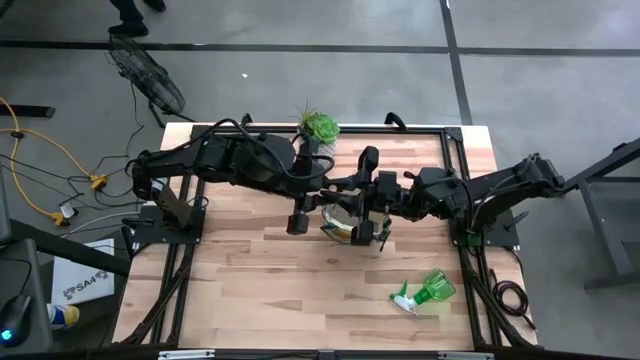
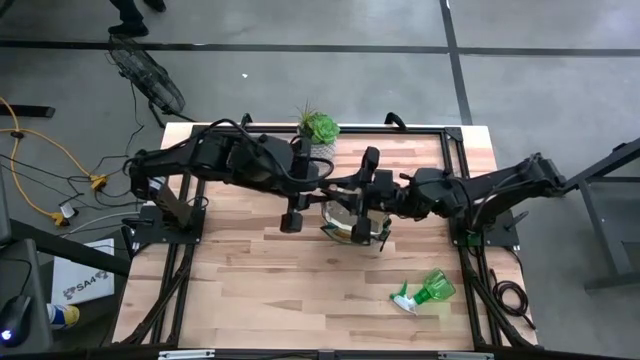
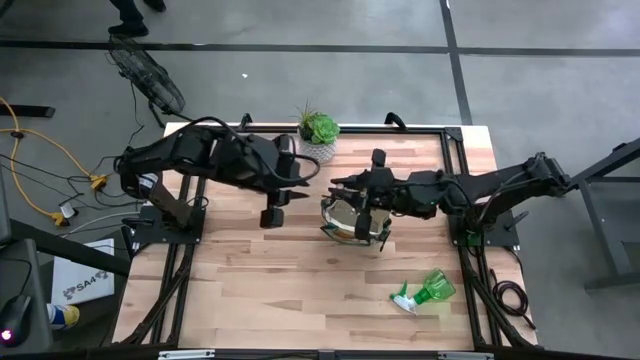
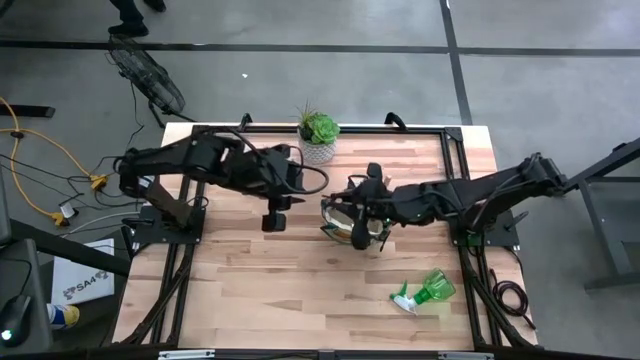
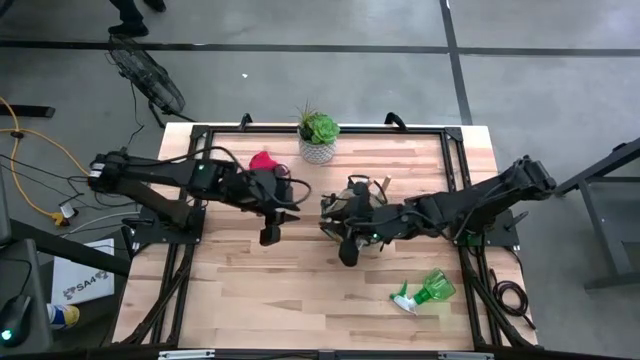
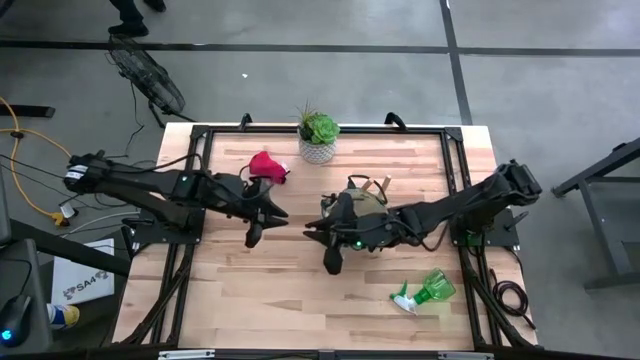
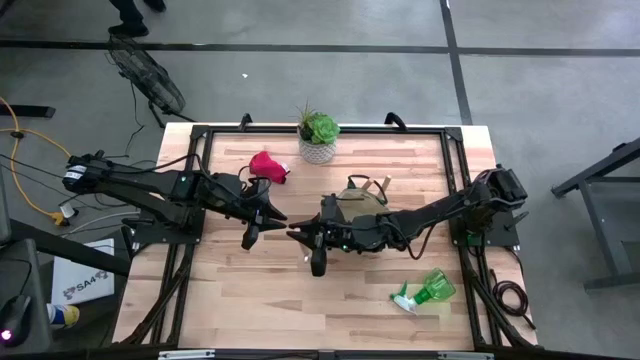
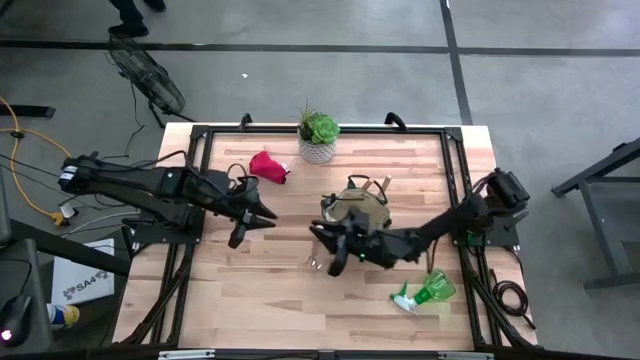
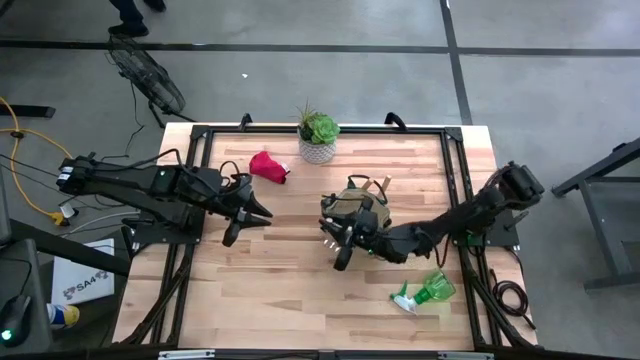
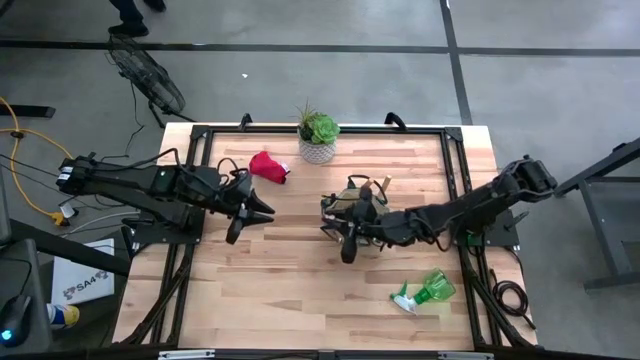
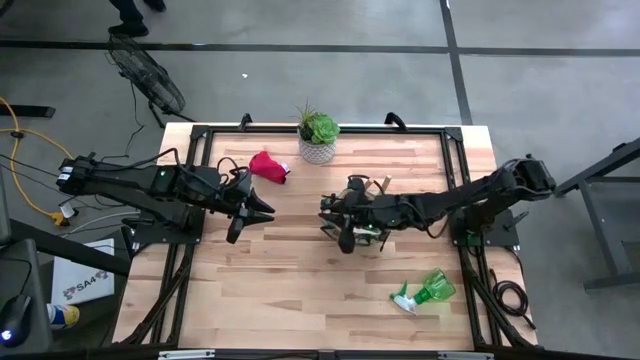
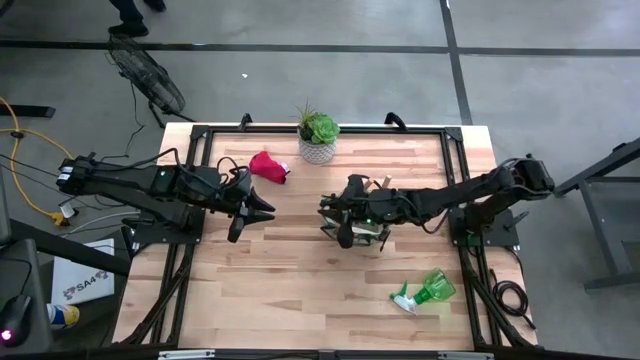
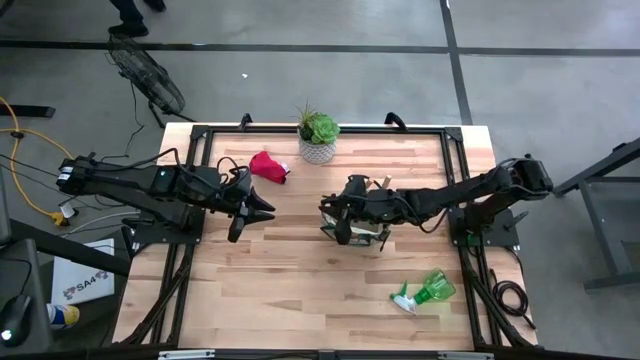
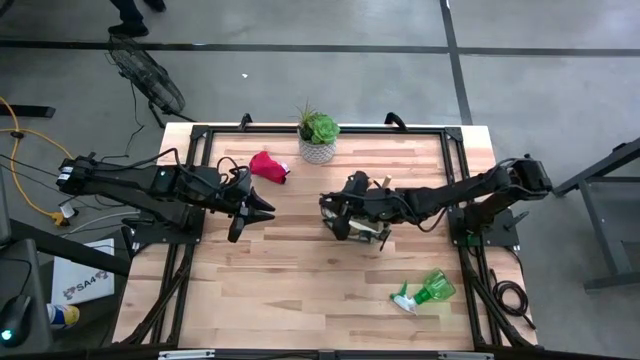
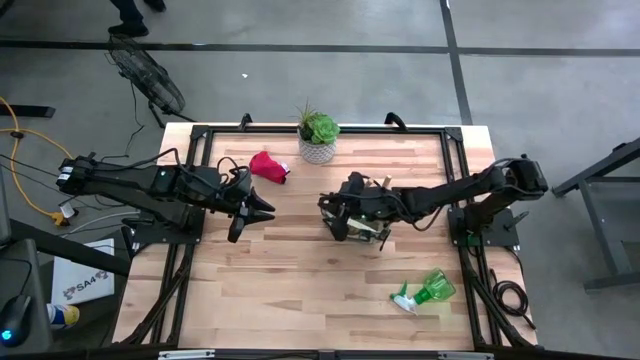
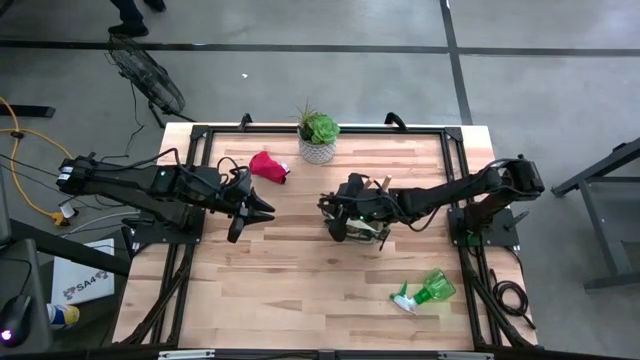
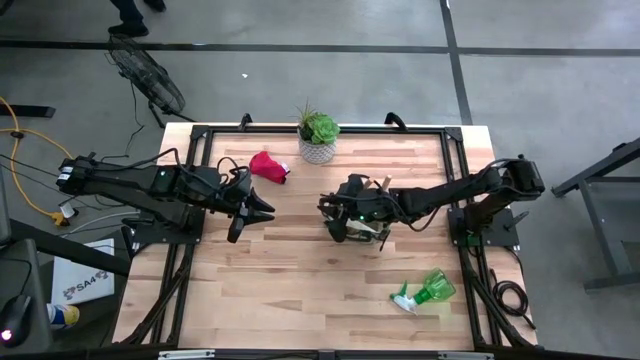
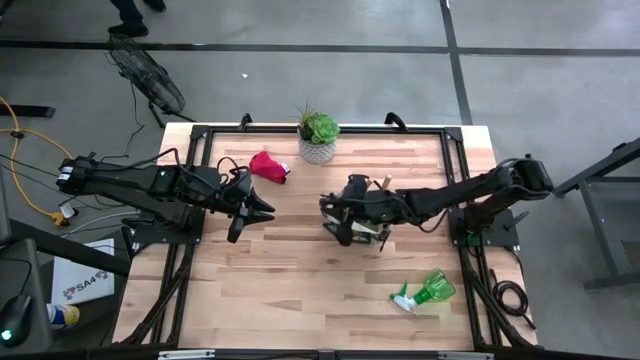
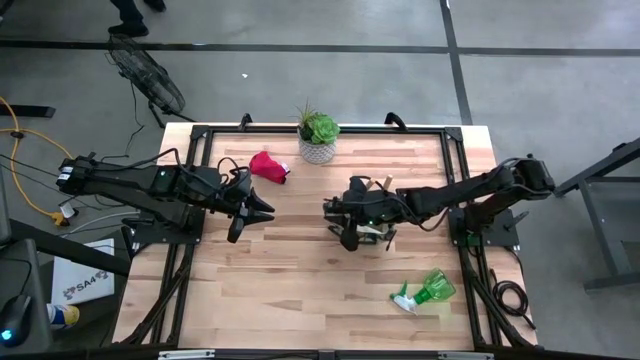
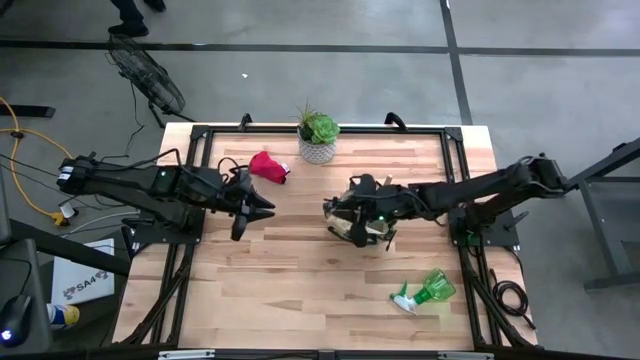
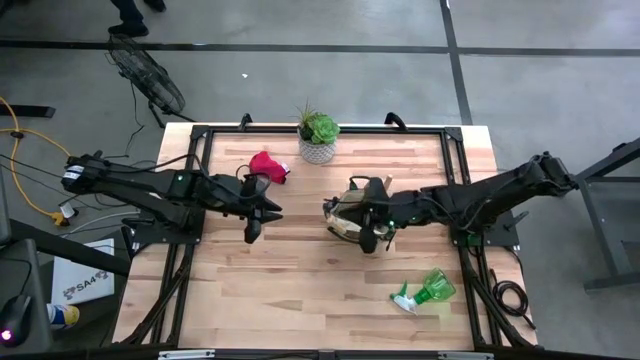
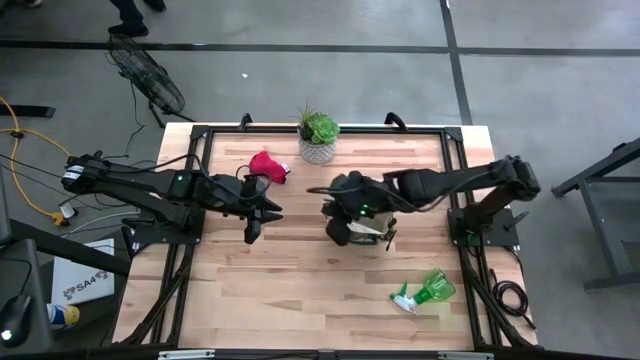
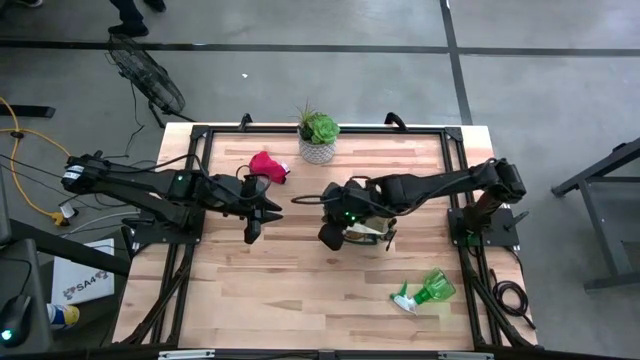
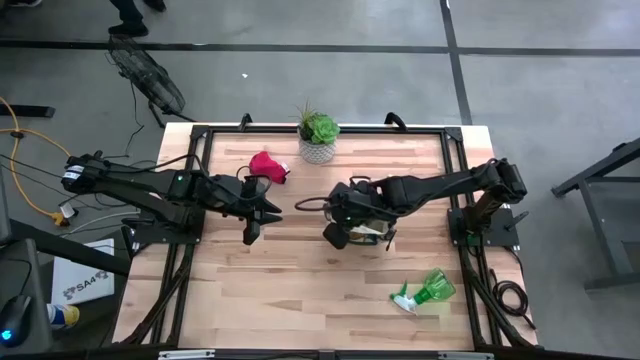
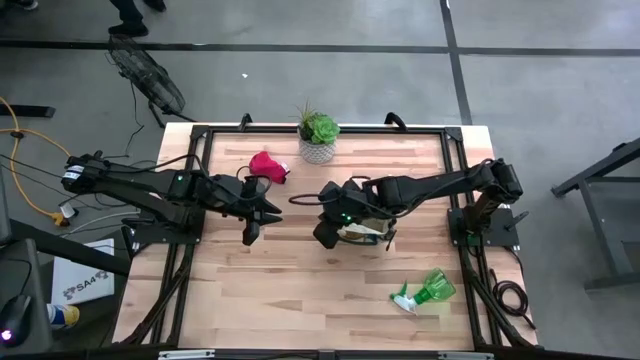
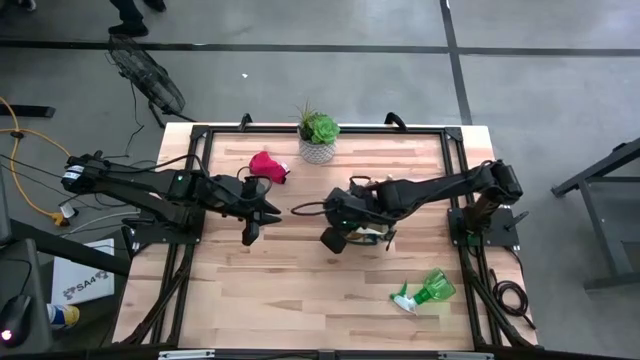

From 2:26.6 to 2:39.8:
Task: Pick & Place Garden tools in Gardening bag
Put the brown hand rake into the gardening bag

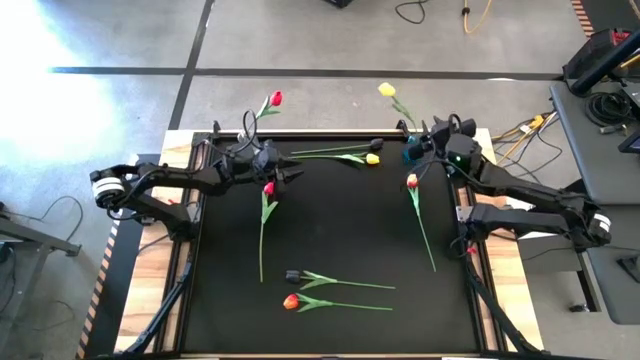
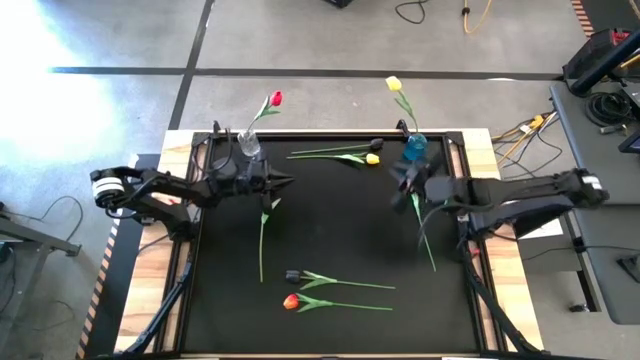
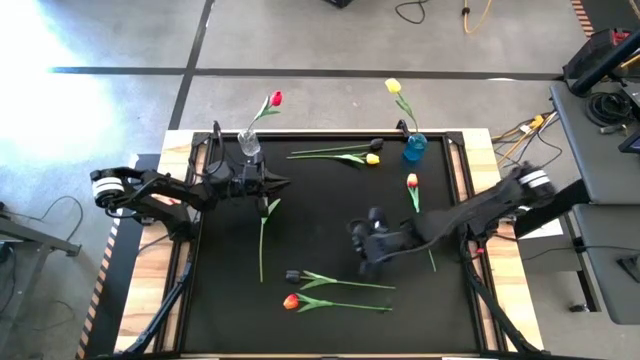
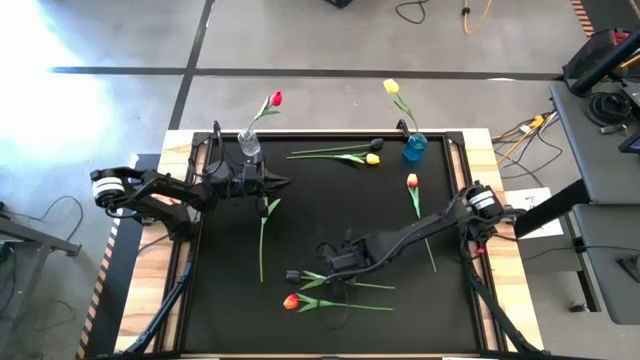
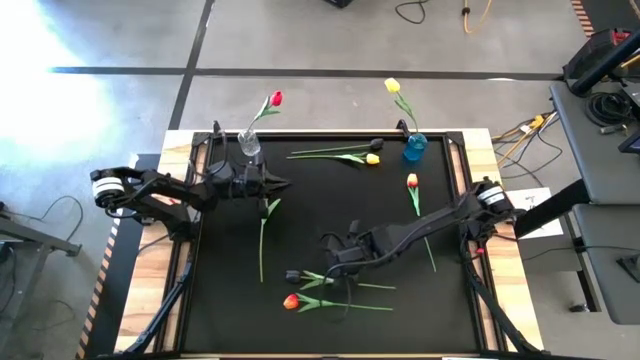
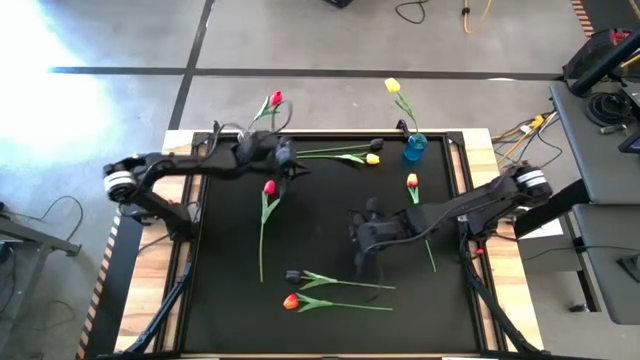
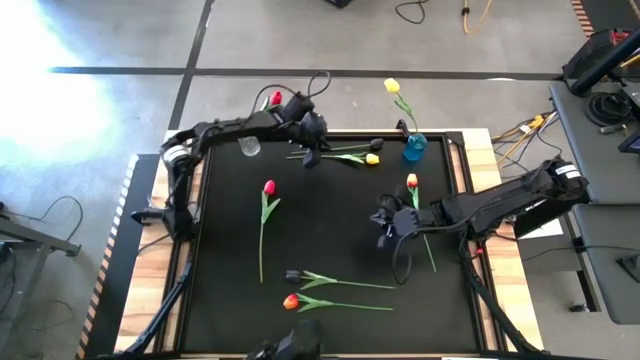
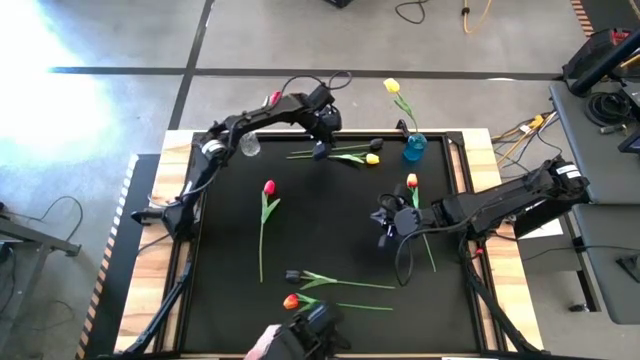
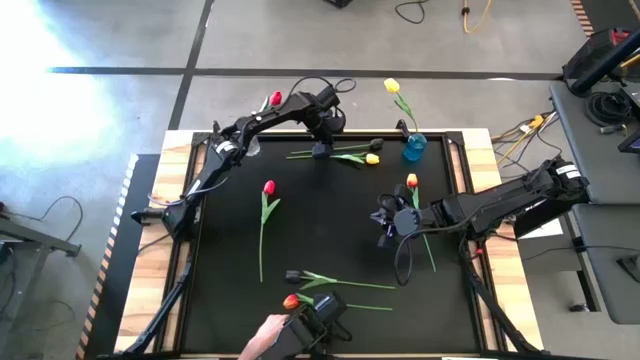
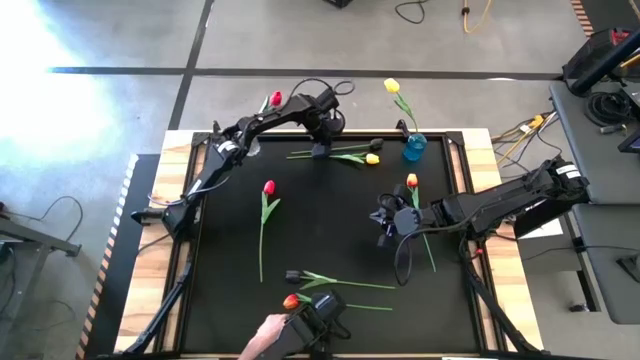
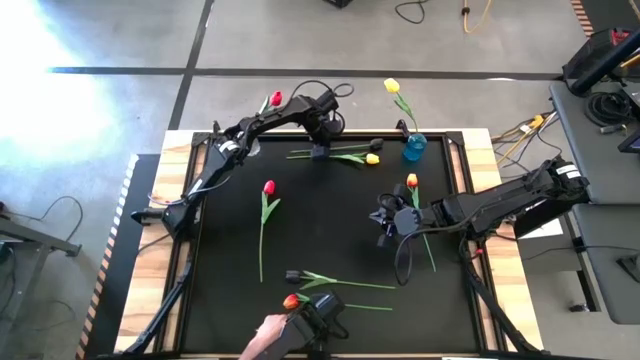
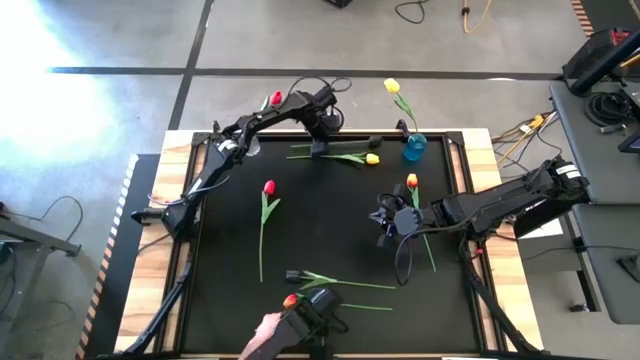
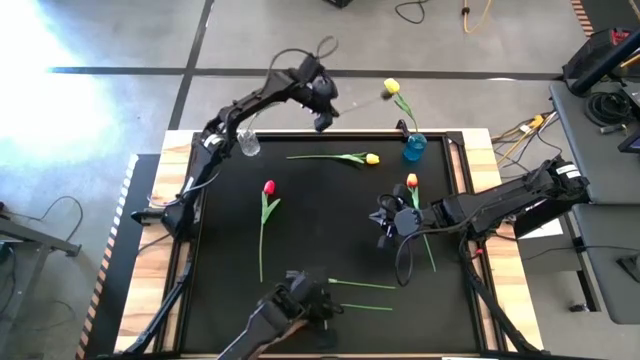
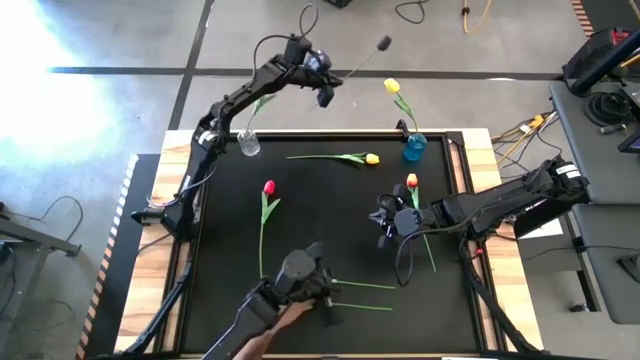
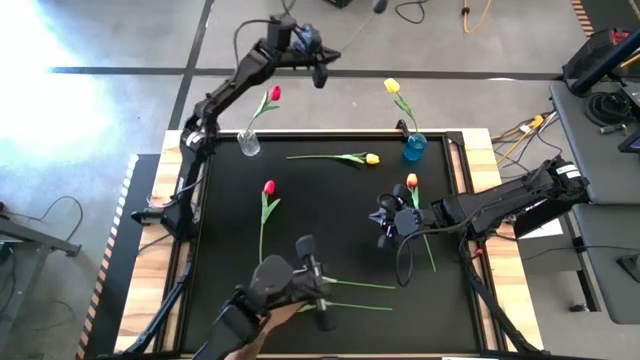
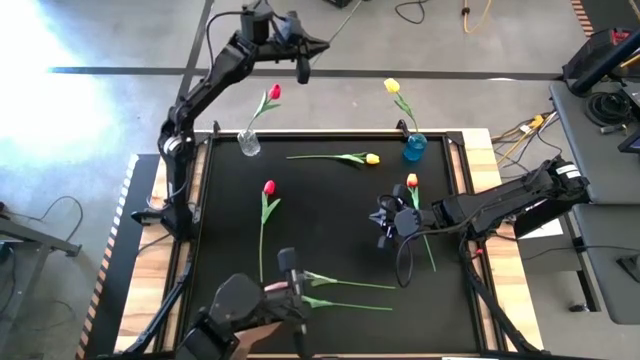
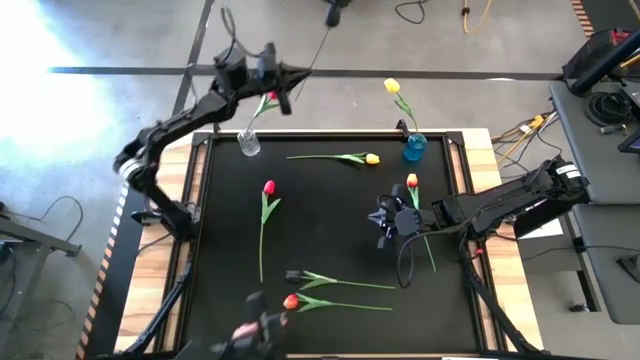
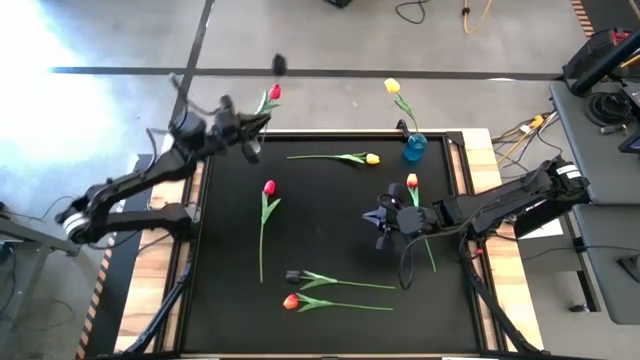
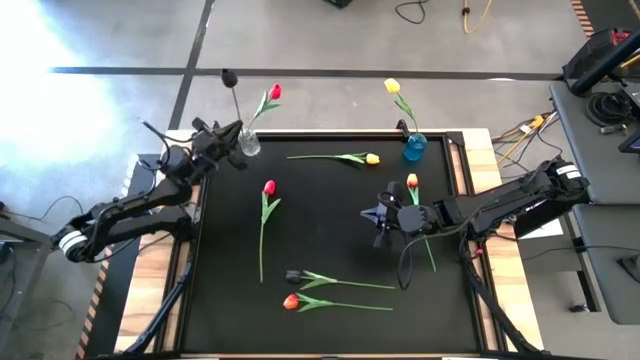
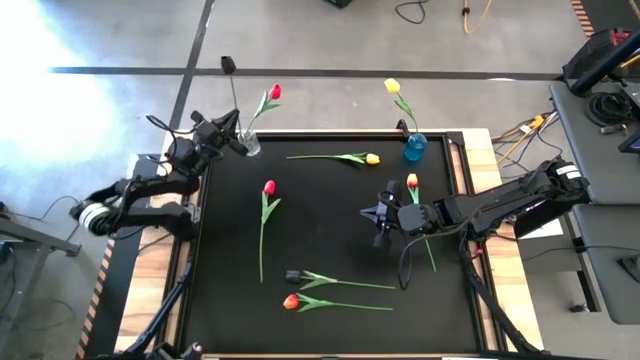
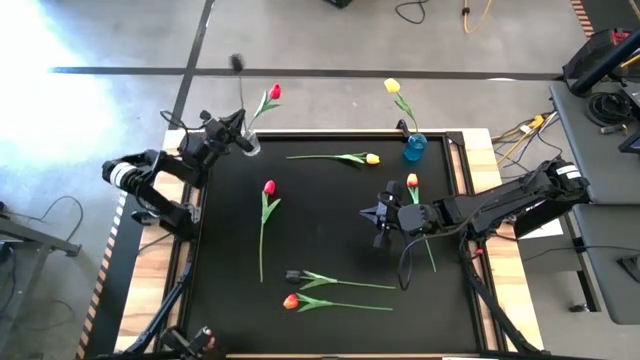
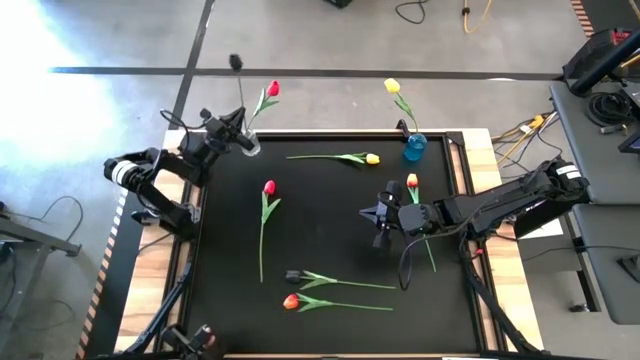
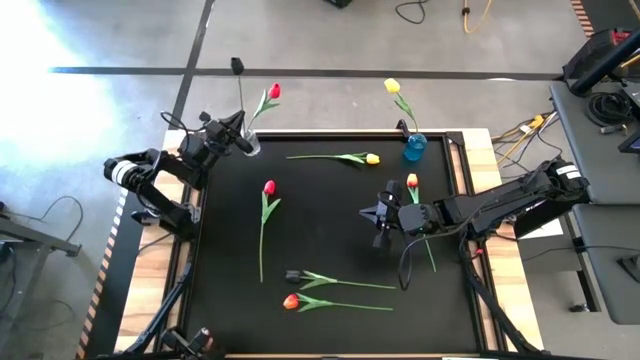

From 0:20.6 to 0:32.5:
Task: Sort flowers into vase by color
Put the top black tulip into the transparent flower vase
